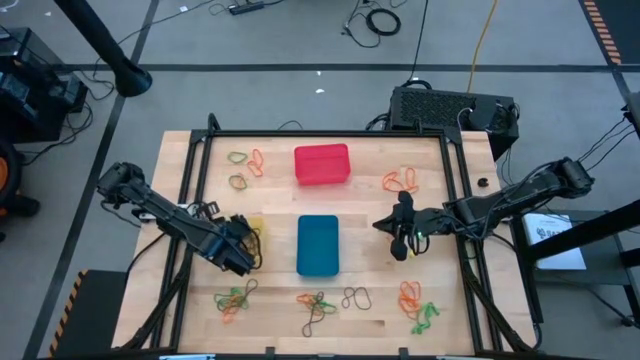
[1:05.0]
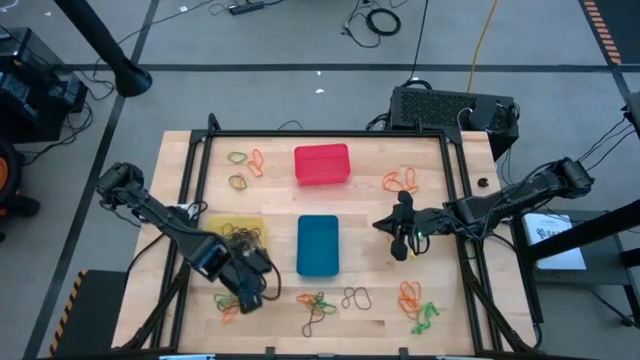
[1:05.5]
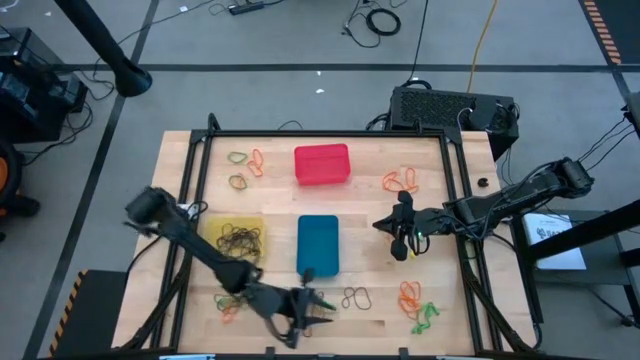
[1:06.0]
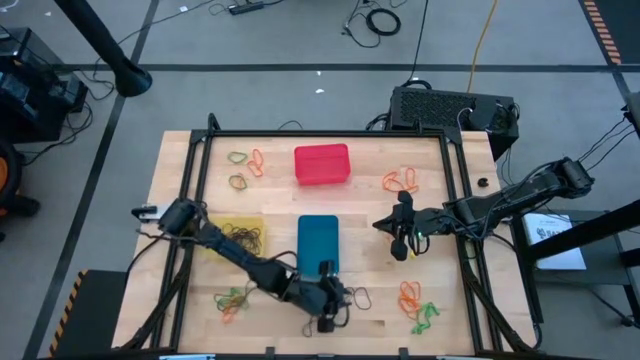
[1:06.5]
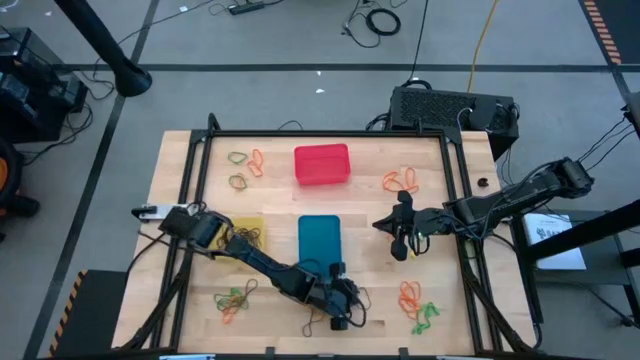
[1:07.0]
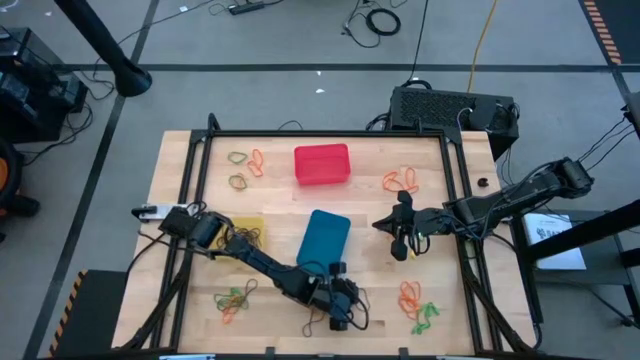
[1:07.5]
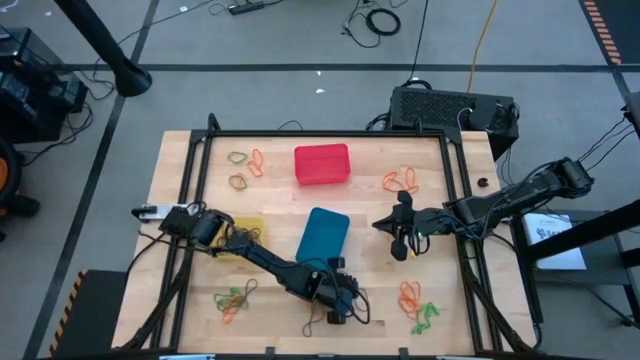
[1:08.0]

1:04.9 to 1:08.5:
Task: Sort rubber bands into baskets
Put the purple rubber band into the yellow bin

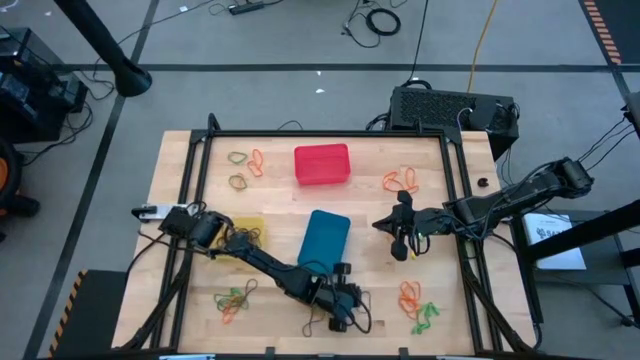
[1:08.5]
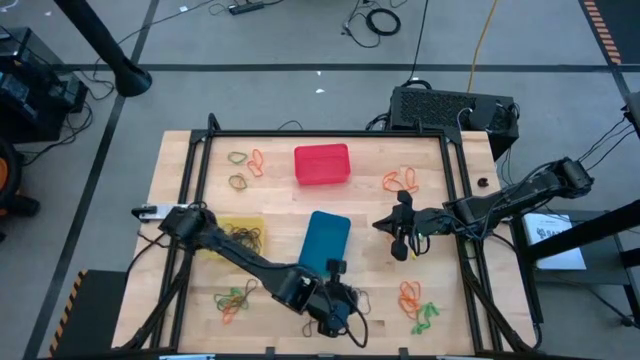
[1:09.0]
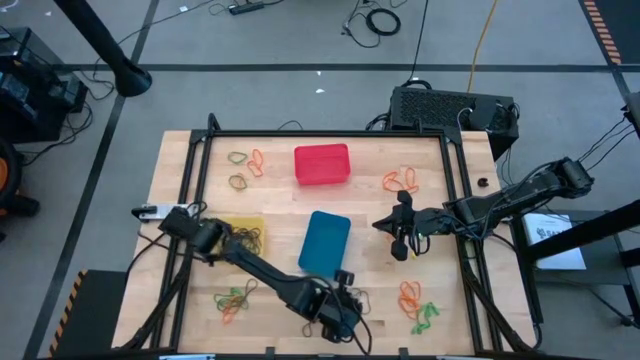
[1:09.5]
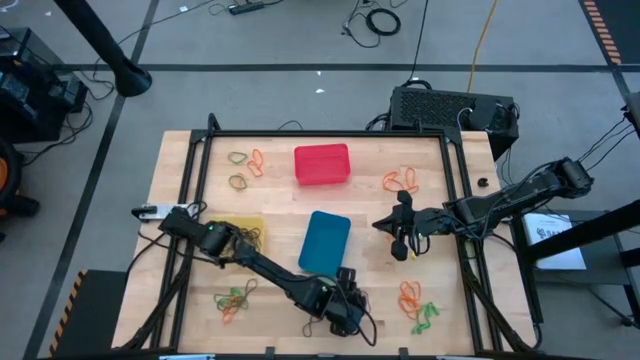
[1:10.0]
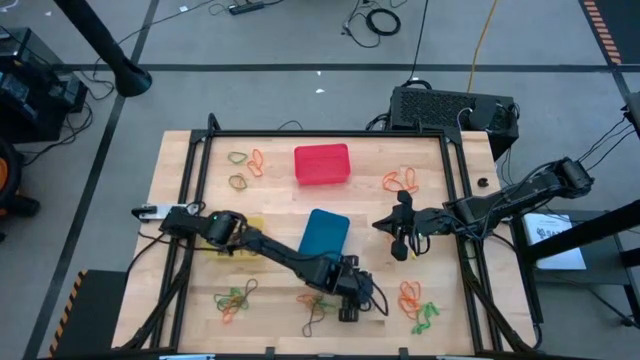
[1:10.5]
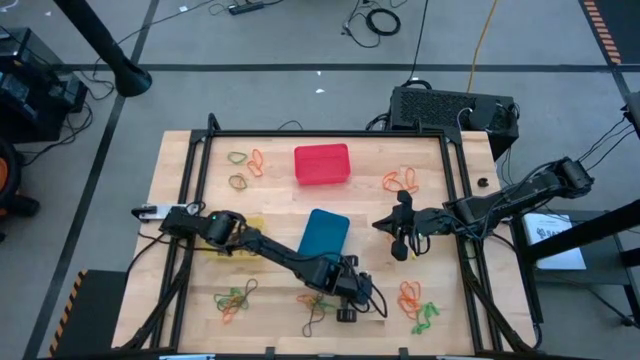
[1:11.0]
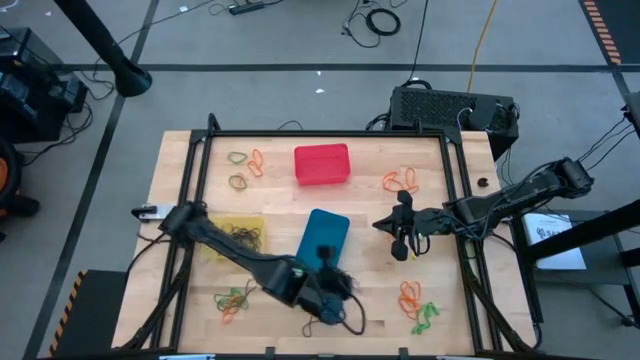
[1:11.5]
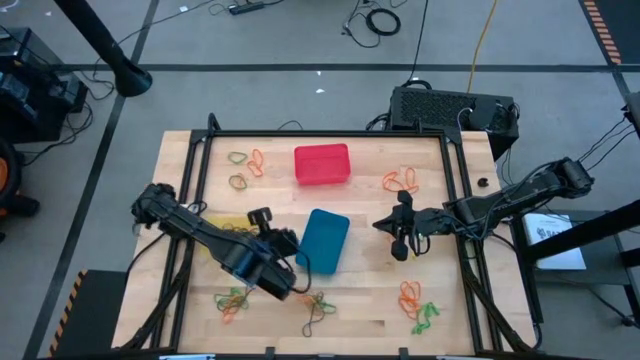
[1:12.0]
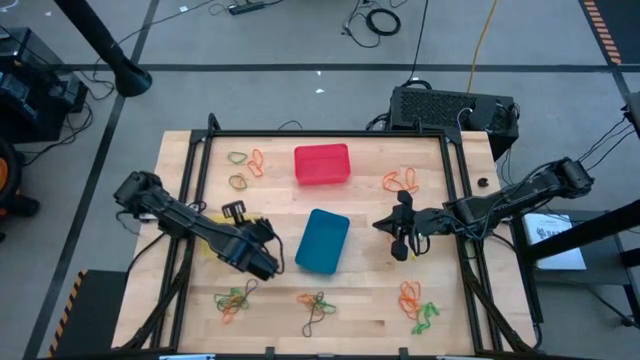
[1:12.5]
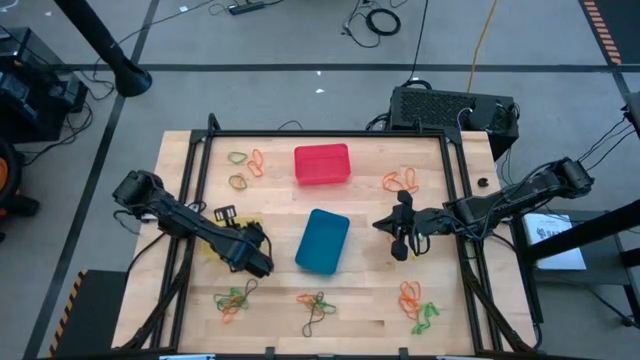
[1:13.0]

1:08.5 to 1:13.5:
Put the purple rubber band into the yellow bin

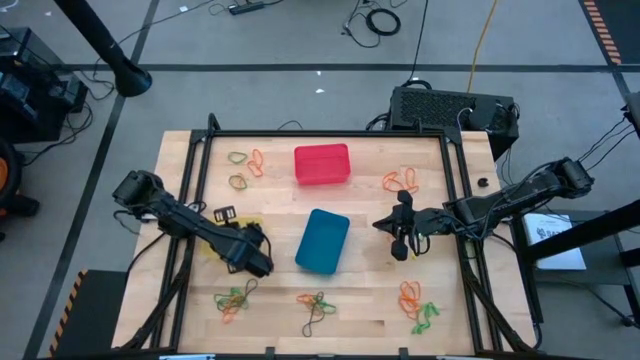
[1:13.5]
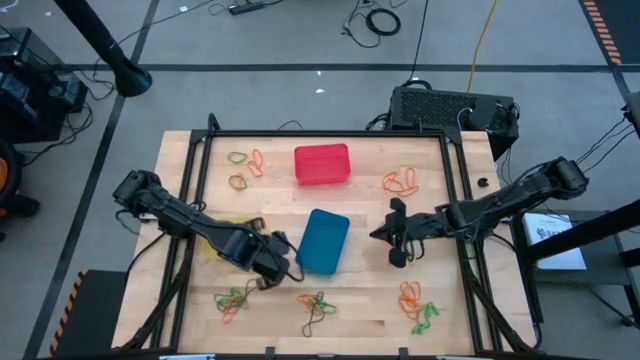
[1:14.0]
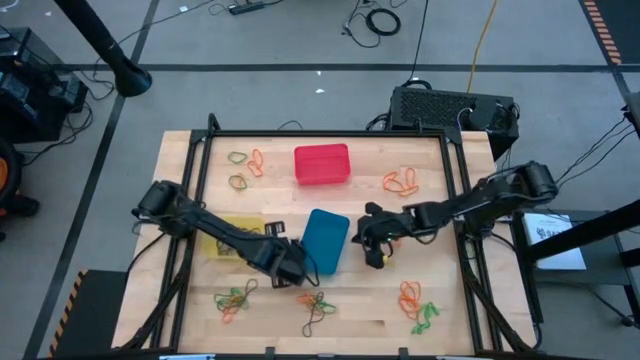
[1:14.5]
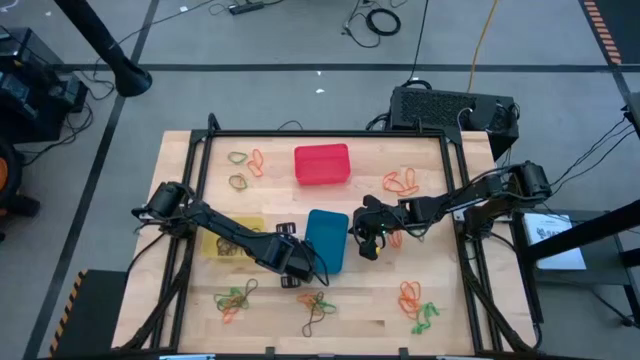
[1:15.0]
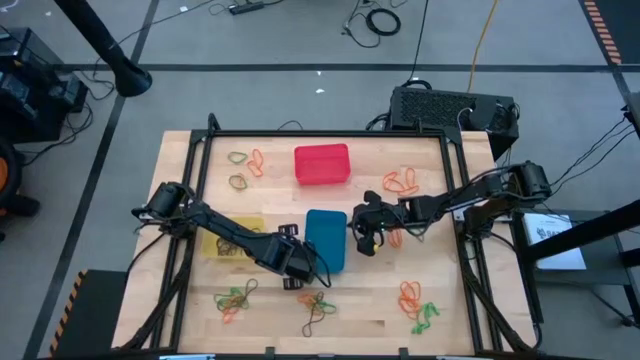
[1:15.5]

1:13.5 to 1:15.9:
Adjust the blue bin on the table

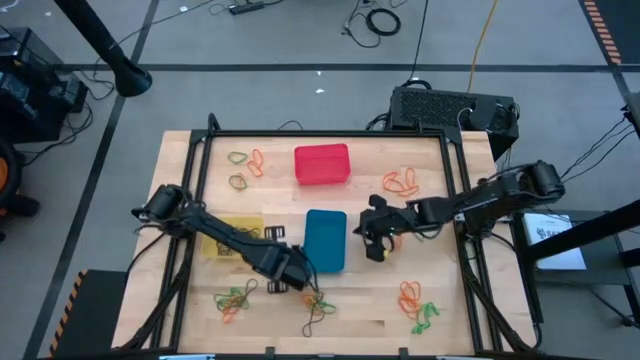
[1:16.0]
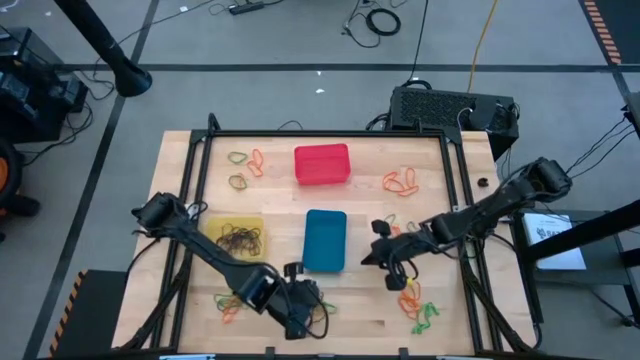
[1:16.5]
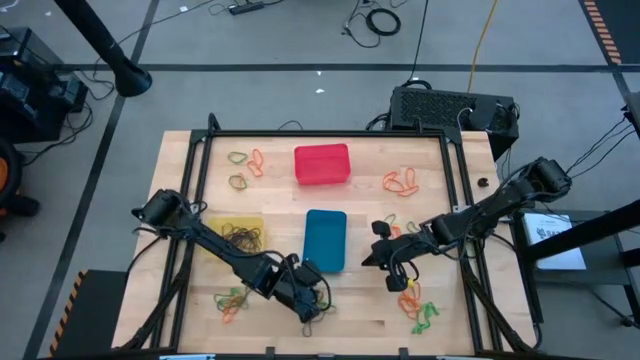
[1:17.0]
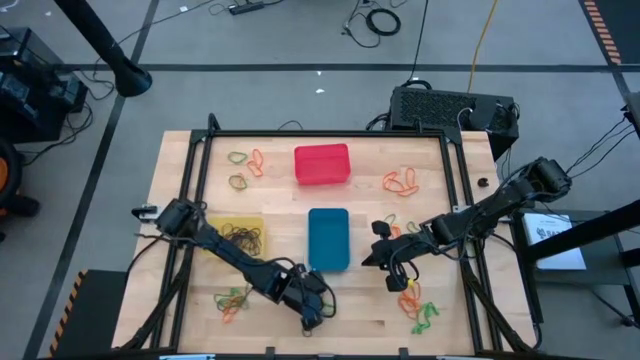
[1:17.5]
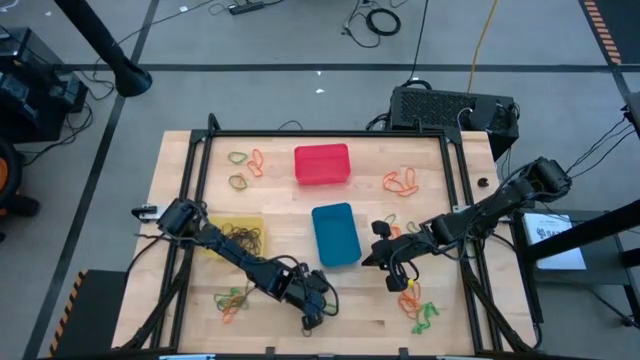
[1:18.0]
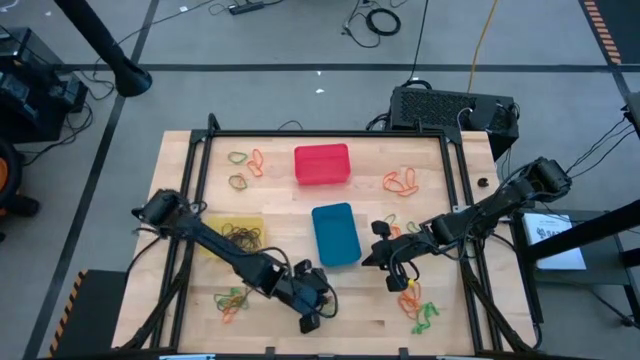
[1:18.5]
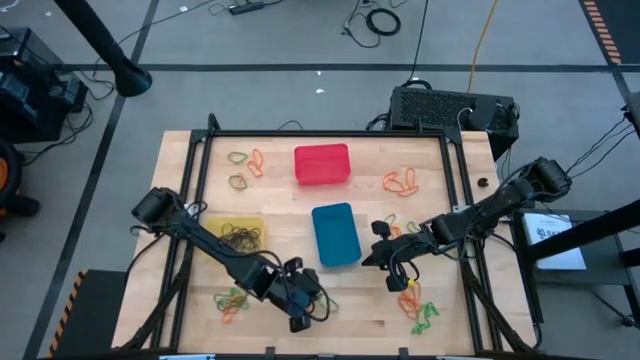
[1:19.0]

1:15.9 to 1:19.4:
Put the purple rubber band into the yellow bin

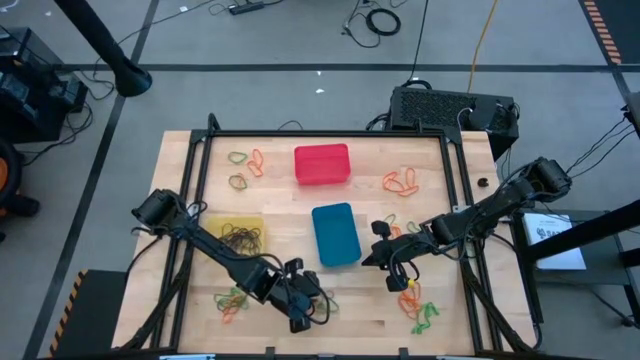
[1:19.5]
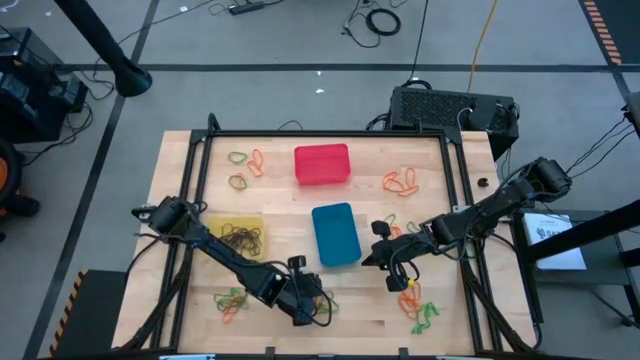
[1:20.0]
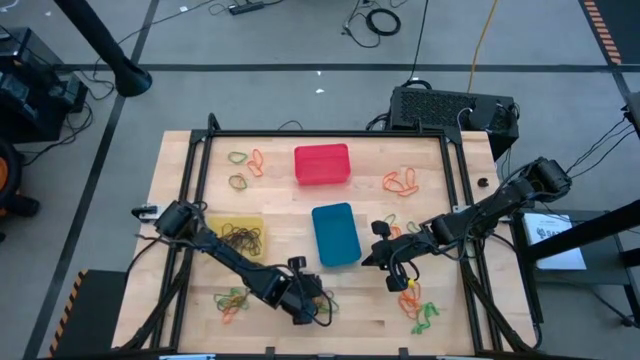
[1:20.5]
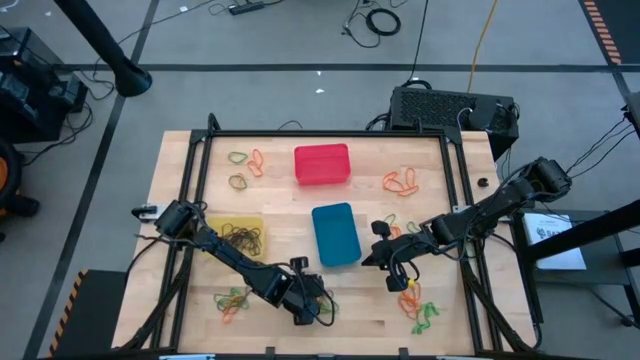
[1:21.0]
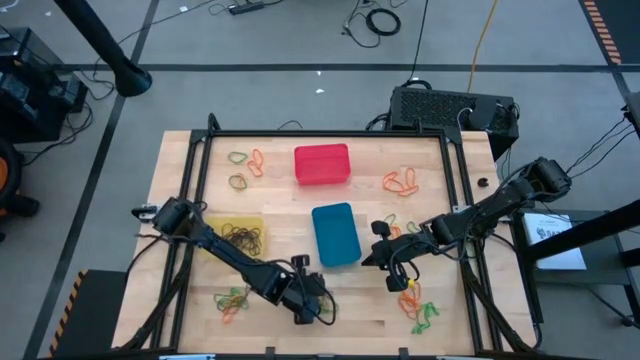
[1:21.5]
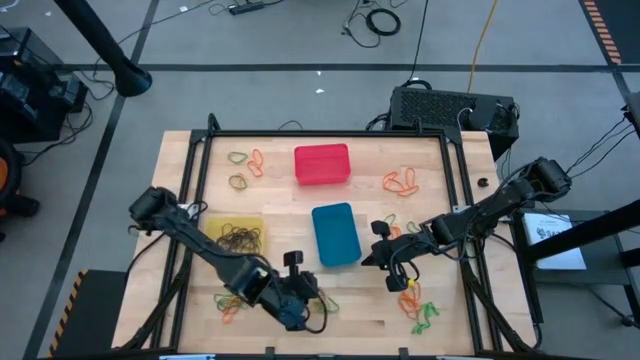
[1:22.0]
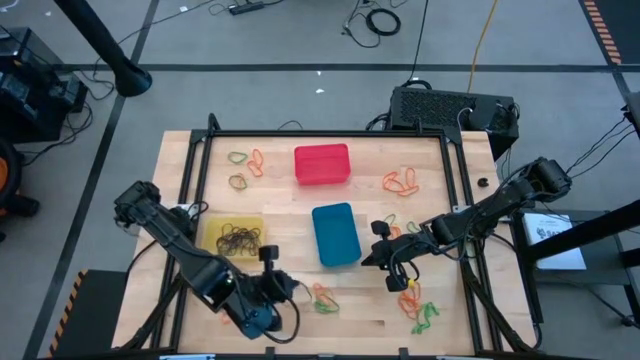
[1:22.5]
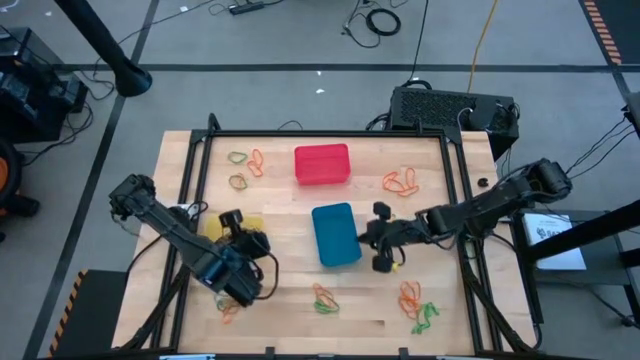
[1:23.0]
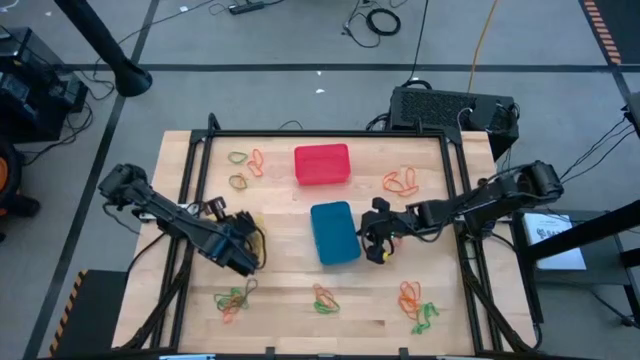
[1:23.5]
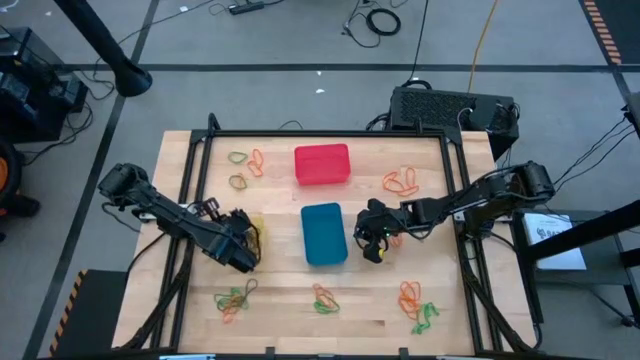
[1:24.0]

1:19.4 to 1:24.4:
Put the purple rubber band into the yellow bin

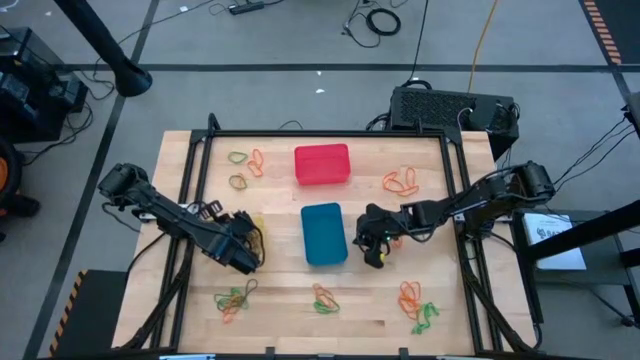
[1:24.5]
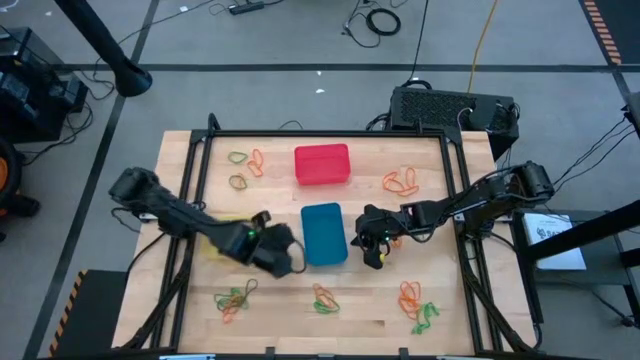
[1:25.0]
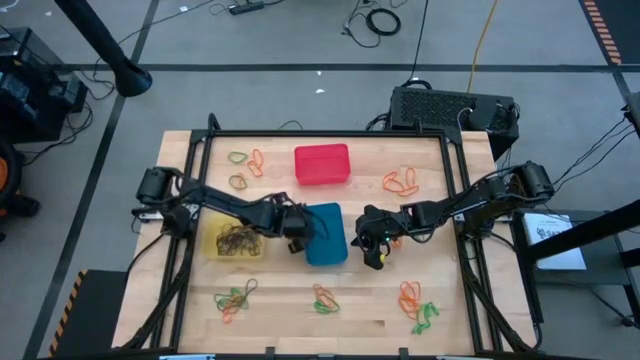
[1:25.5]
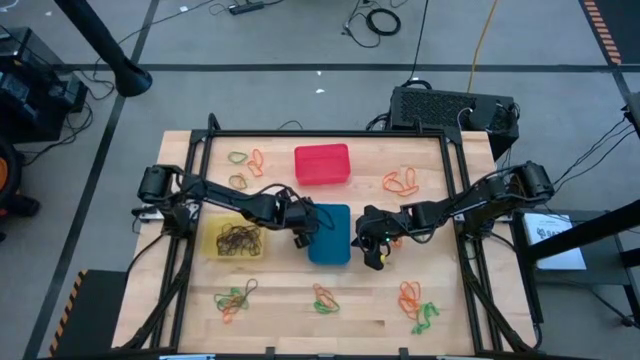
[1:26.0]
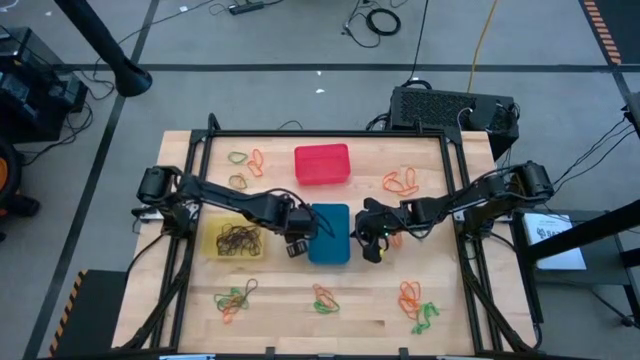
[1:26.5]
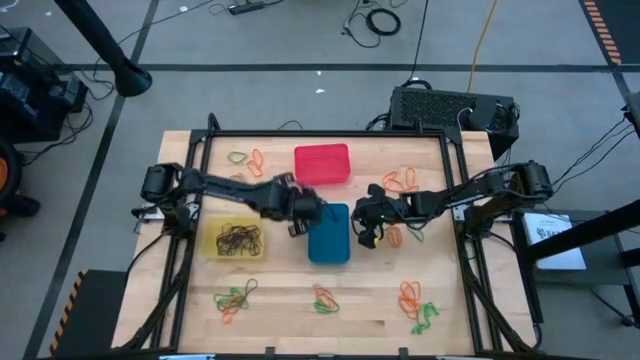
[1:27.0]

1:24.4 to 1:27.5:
Adjust the bins on the table
